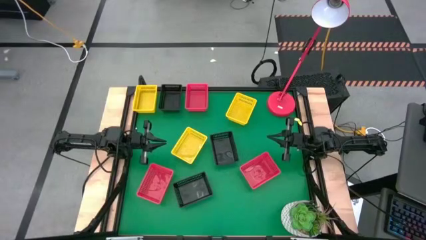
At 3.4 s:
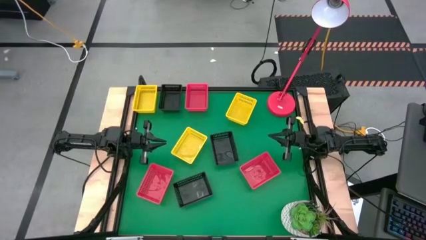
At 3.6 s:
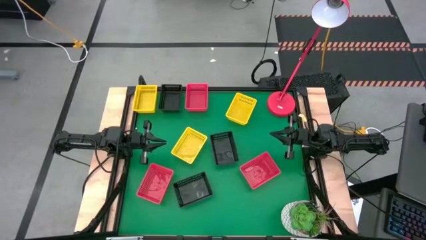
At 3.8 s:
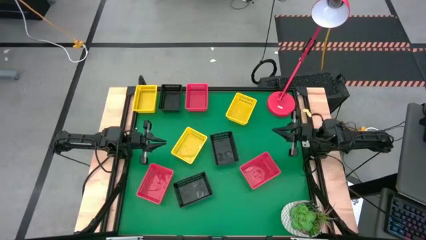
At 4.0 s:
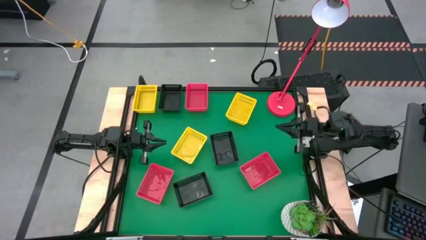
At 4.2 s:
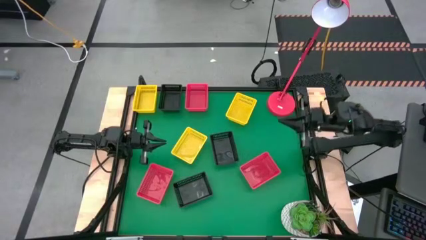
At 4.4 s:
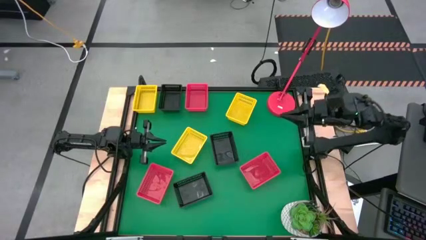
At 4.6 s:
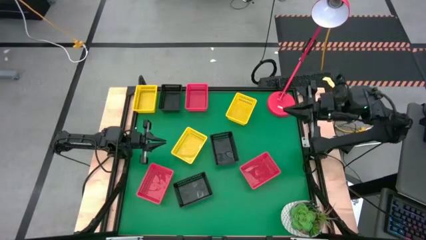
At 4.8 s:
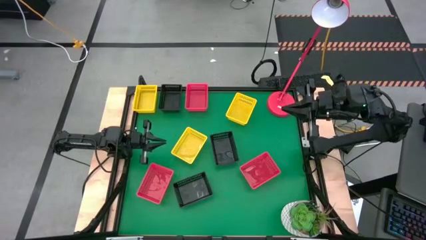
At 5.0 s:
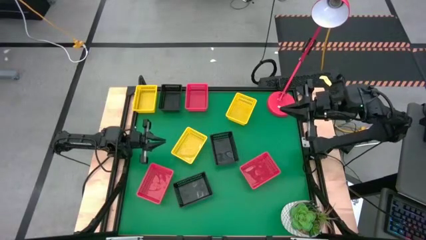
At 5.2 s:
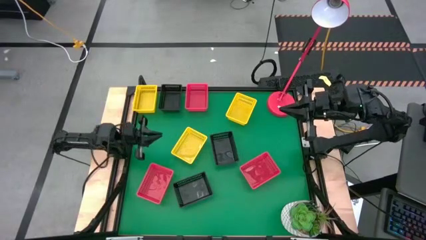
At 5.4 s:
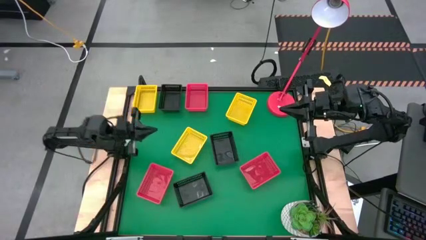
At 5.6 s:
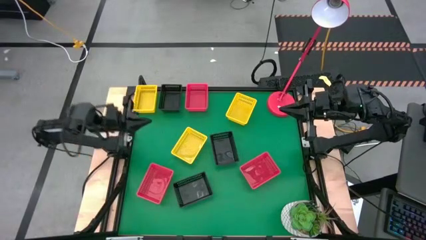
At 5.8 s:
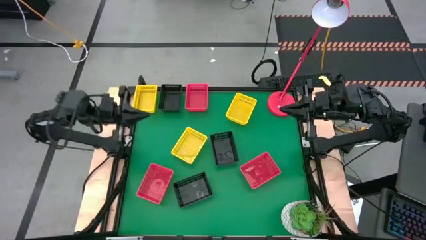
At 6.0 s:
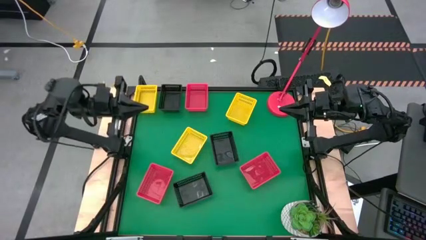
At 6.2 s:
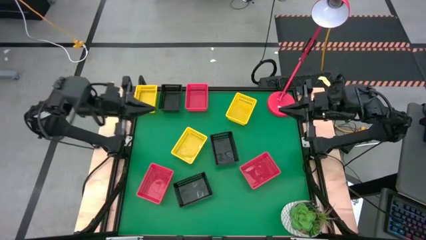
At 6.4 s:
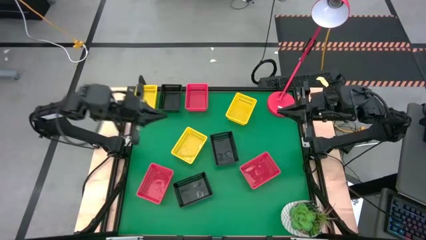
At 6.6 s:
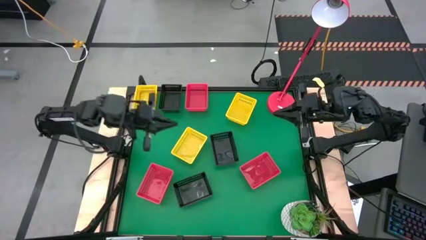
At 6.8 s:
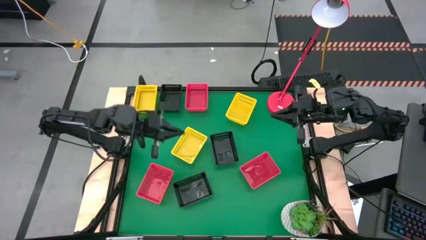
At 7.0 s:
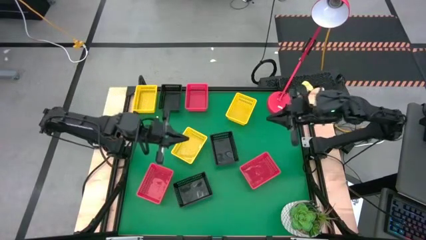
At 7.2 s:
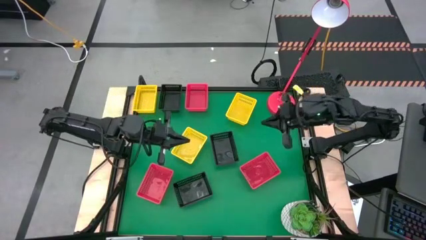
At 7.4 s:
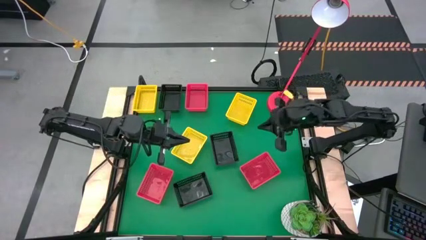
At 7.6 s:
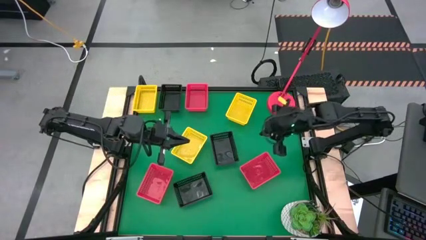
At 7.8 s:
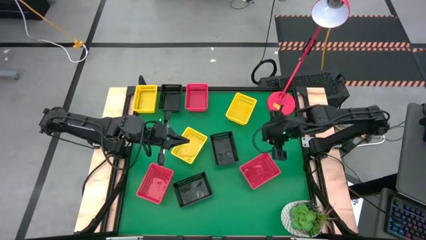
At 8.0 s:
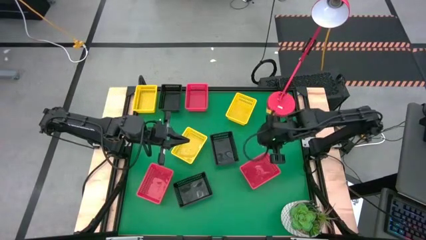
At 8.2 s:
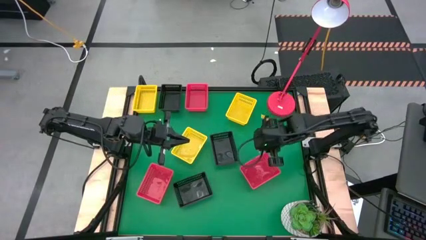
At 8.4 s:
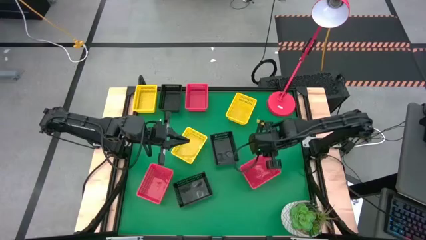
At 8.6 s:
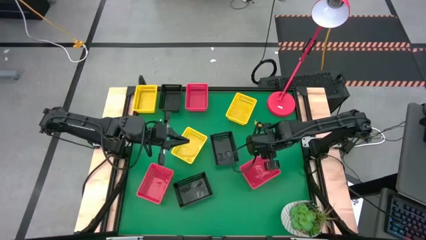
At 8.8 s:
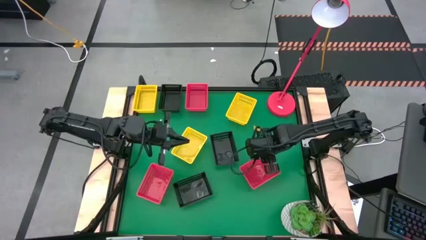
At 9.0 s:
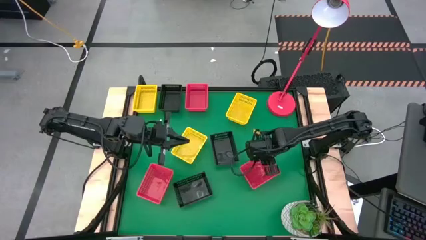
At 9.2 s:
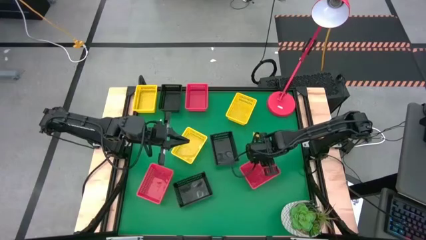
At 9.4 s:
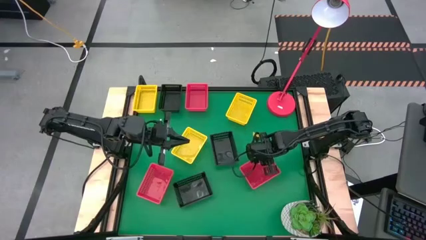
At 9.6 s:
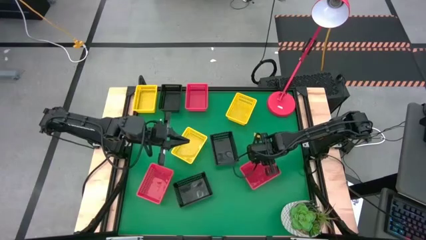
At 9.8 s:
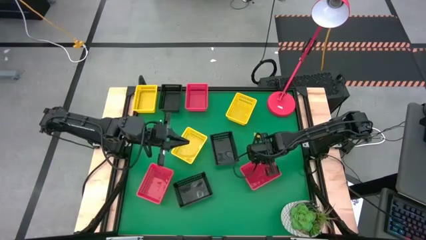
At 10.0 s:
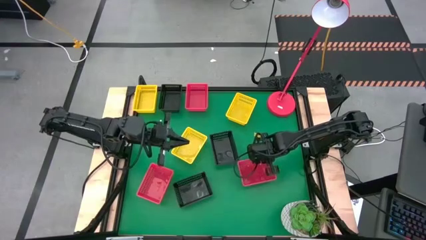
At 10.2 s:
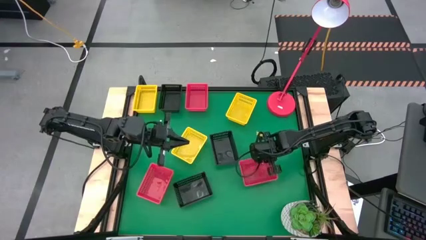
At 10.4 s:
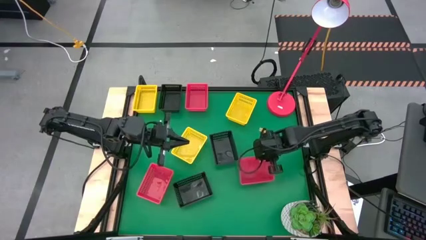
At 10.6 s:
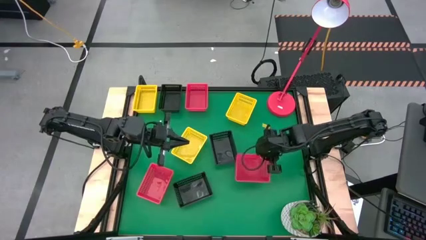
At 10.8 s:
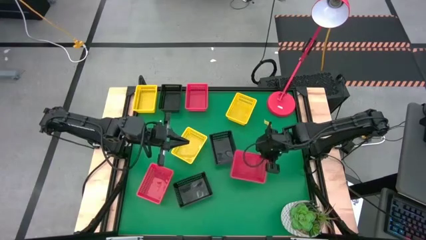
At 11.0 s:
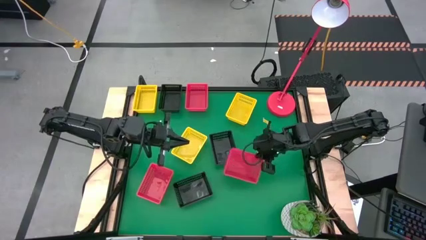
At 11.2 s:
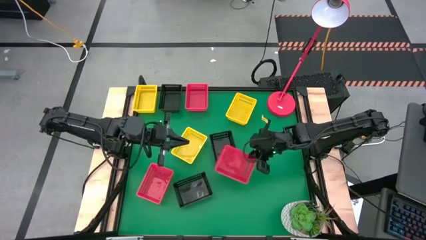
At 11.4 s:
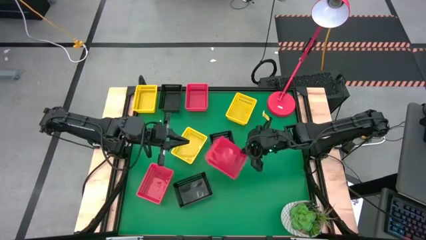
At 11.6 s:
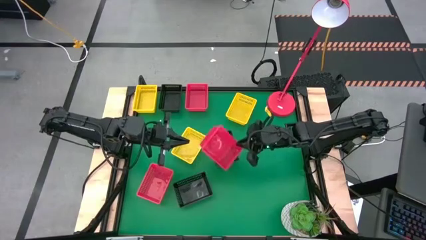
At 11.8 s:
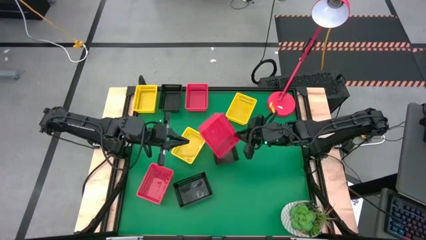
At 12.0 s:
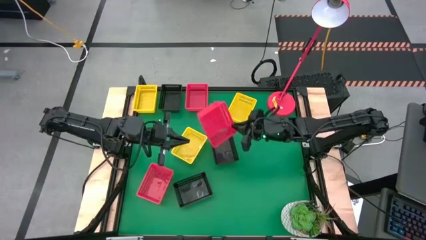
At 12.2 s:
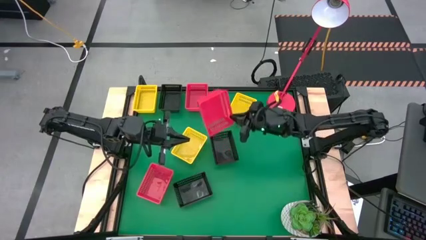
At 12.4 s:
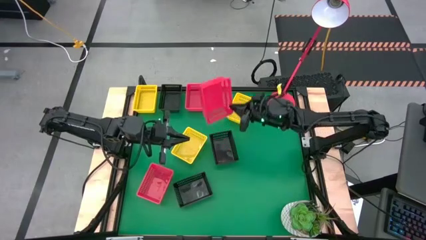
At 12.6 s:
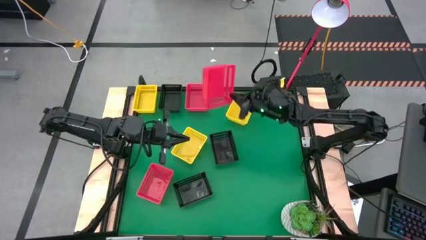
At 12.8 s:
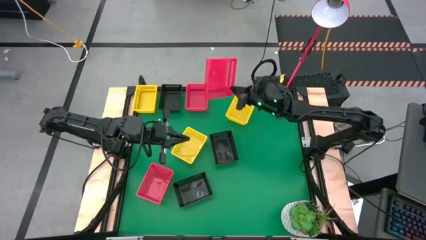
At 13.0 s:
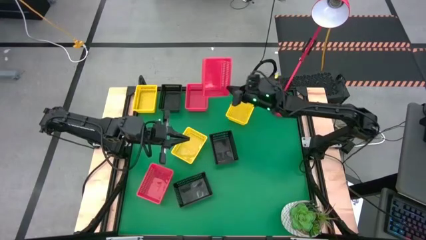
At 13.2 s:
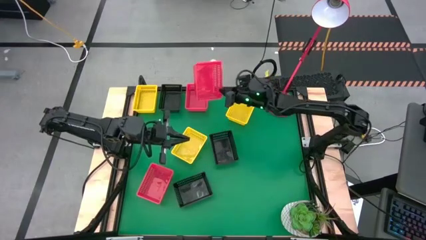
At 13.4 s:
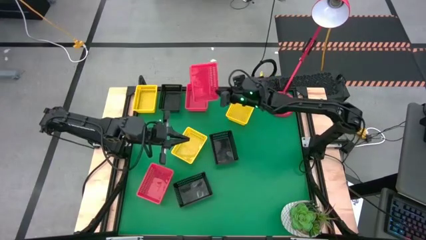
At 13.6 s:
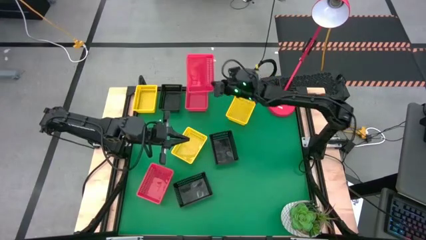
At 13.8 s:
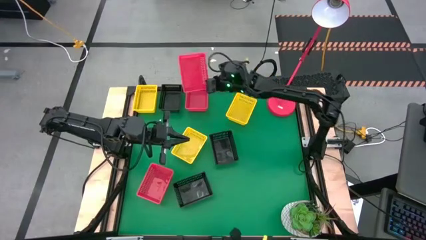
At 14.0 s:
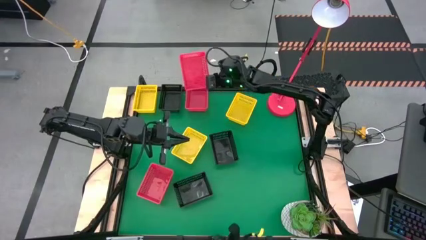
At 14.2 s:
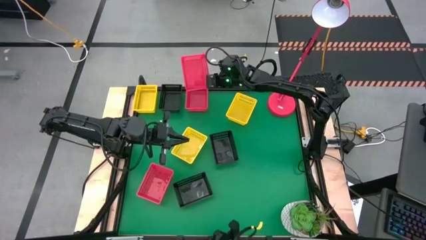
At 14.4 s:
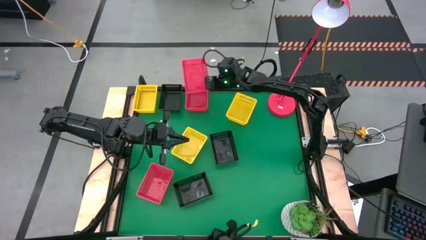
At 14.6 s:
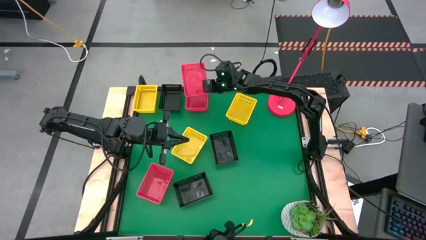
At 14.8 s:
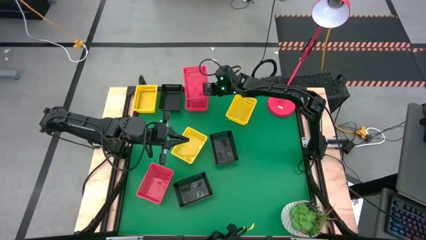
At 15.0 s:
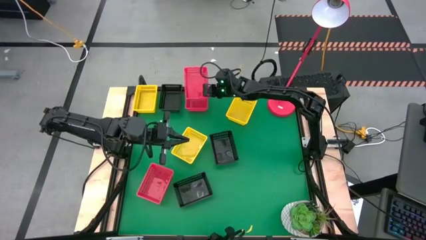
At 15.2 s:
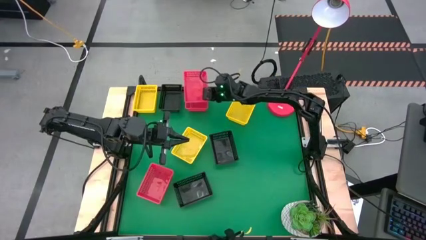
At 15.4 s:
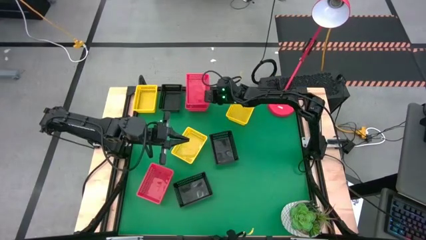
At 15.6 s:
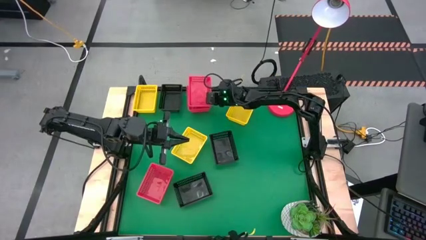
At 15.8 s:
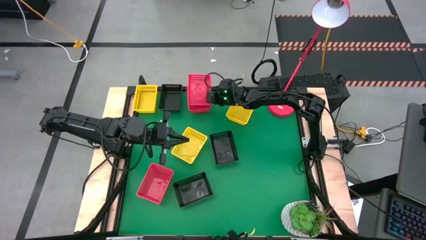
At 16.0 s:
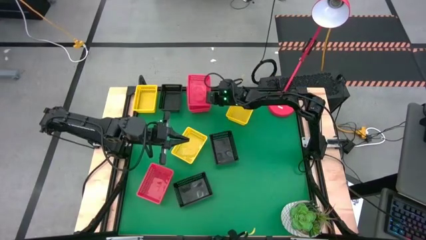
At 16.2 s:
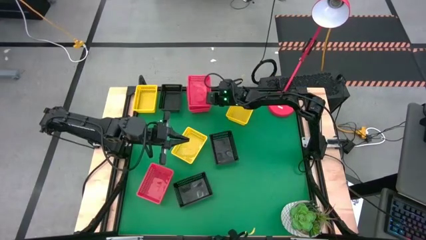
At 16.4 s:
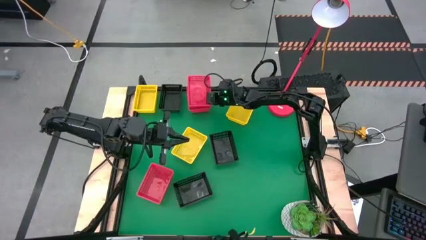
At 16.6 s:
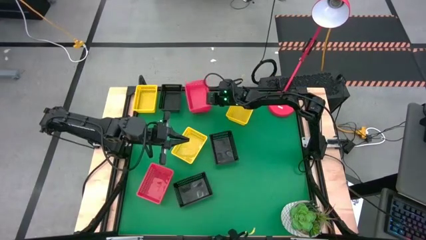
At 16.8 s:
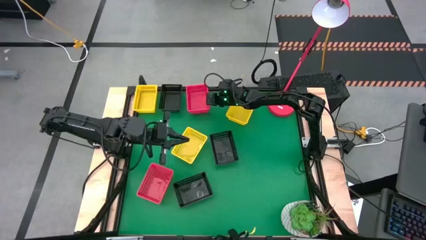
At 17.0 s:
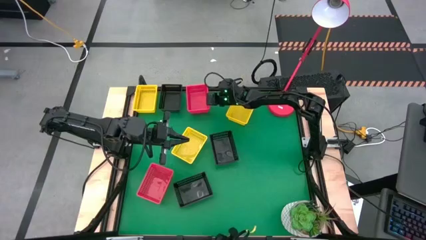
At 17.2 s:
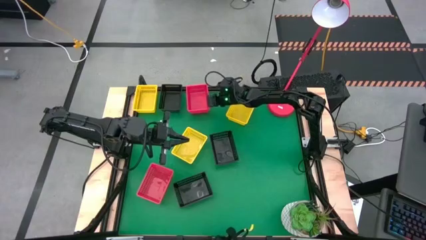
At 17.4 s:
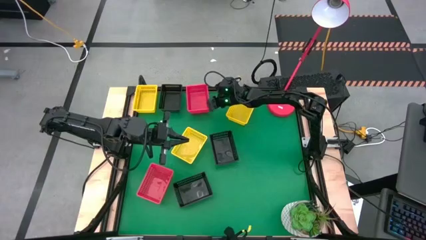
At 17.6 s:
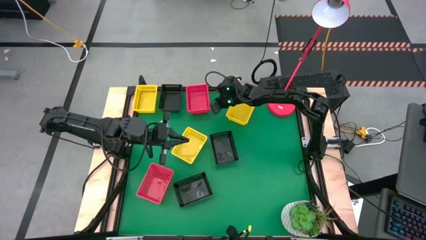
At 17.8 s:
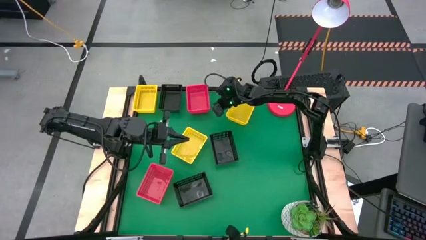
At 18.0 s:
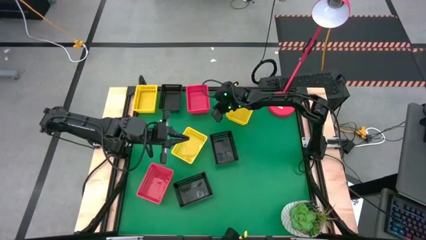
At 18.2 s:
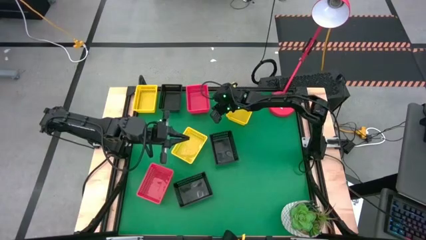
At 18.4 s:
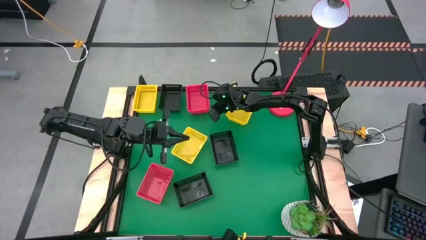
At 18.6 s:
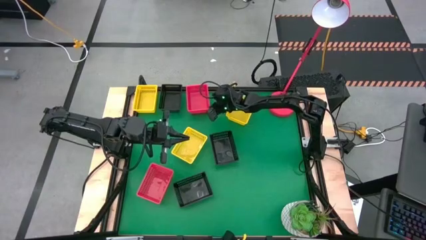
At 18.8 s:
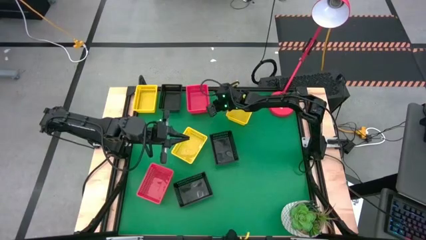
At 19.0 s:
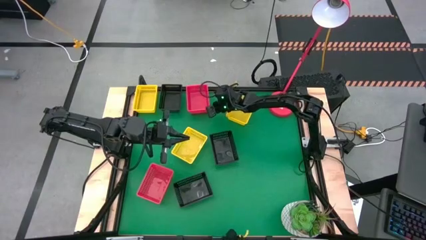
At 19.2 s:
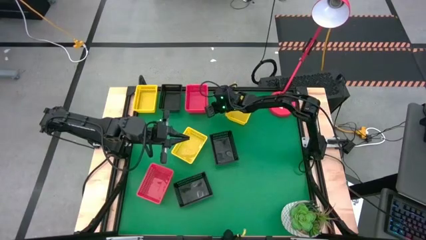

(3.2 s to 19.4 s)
Stack the bottom right red bin on top of the top red bin
